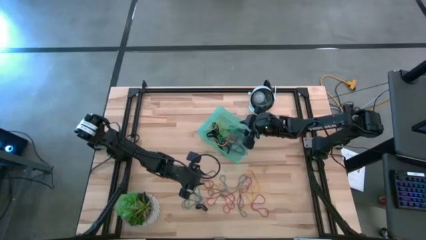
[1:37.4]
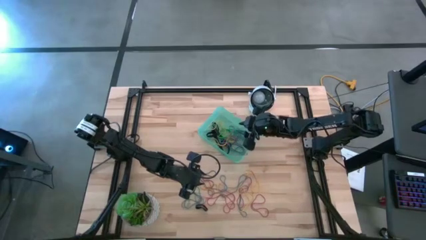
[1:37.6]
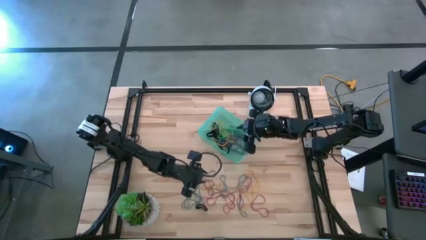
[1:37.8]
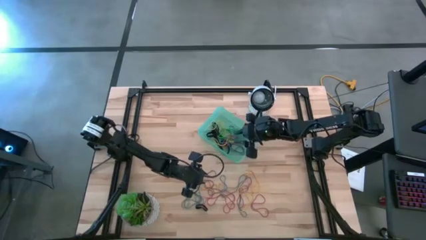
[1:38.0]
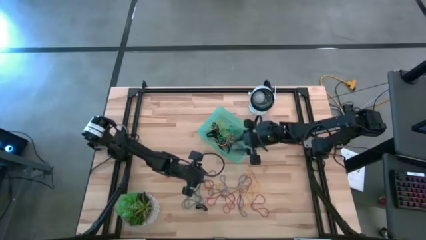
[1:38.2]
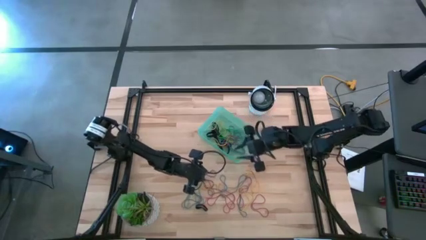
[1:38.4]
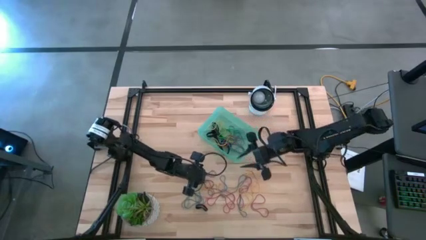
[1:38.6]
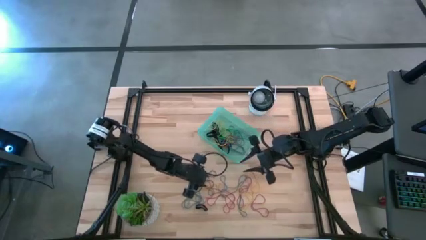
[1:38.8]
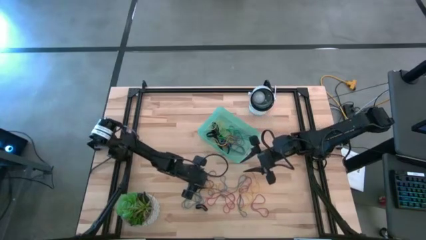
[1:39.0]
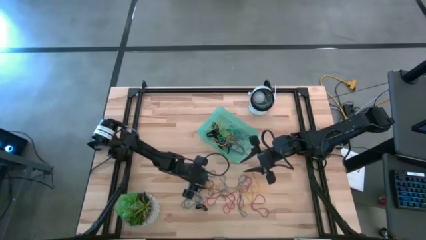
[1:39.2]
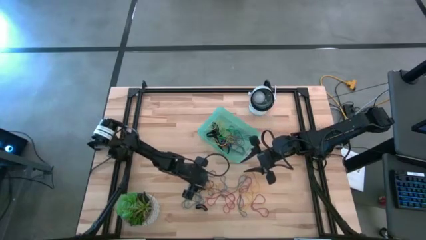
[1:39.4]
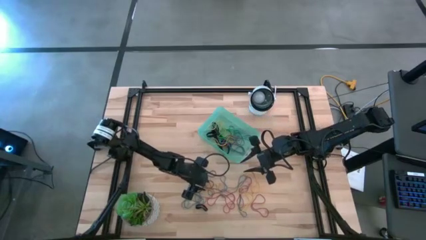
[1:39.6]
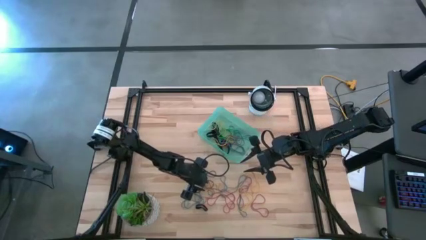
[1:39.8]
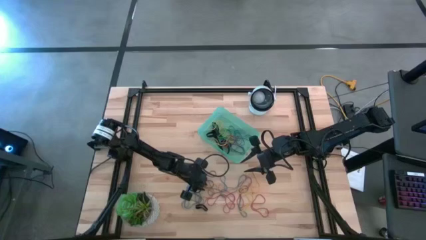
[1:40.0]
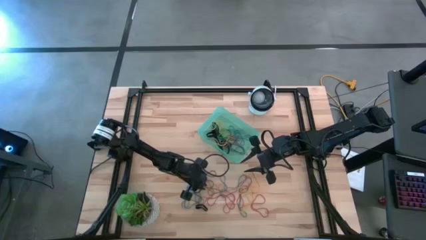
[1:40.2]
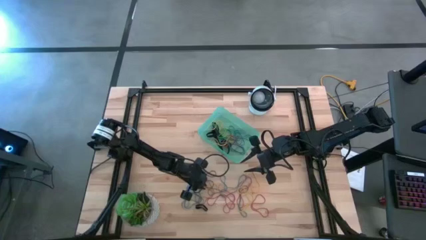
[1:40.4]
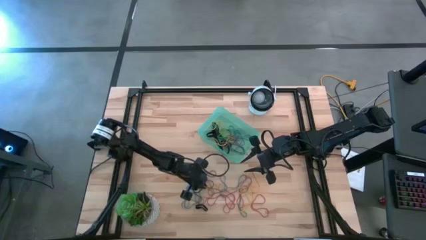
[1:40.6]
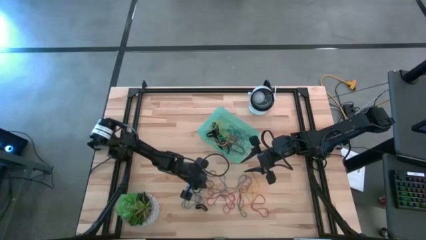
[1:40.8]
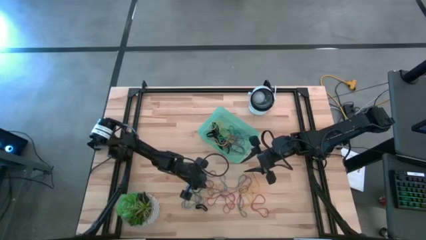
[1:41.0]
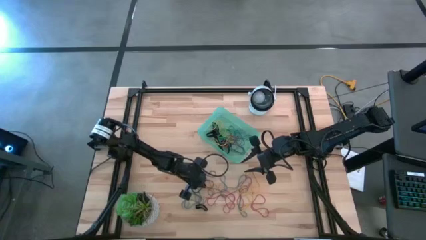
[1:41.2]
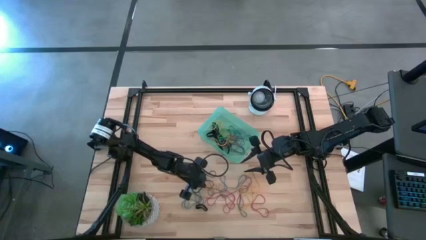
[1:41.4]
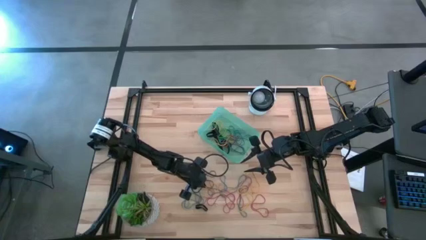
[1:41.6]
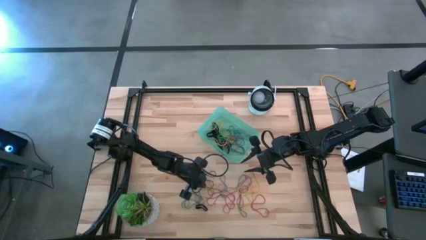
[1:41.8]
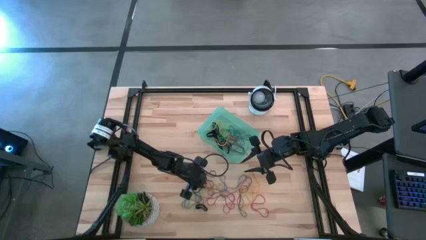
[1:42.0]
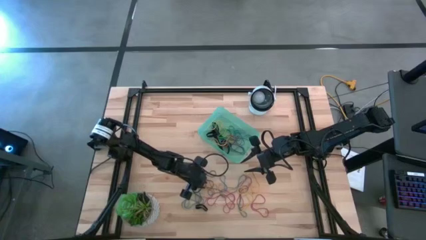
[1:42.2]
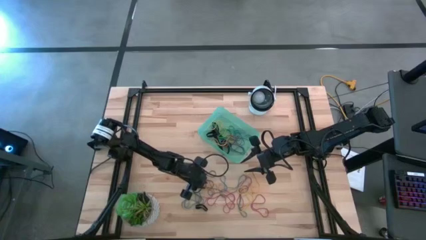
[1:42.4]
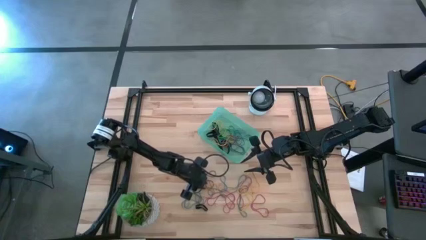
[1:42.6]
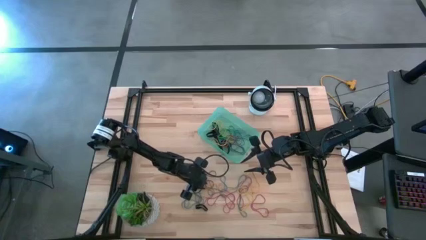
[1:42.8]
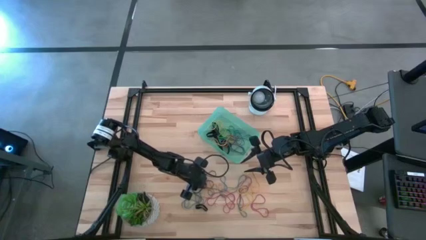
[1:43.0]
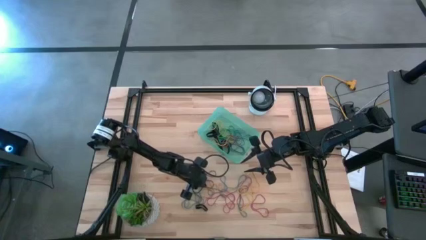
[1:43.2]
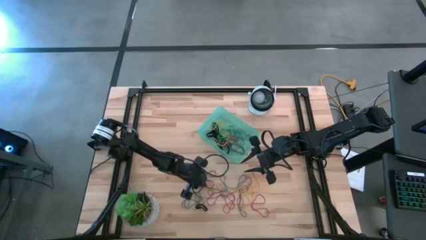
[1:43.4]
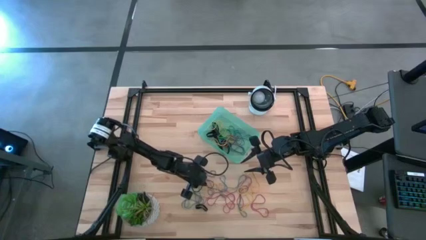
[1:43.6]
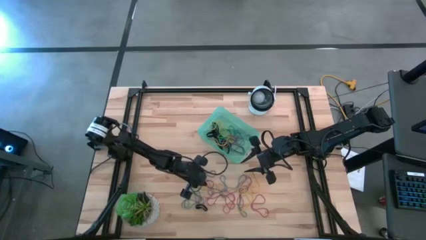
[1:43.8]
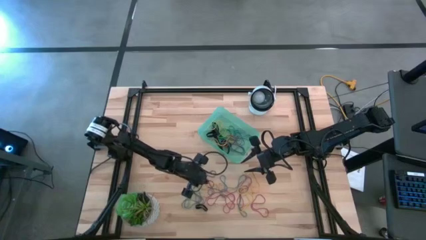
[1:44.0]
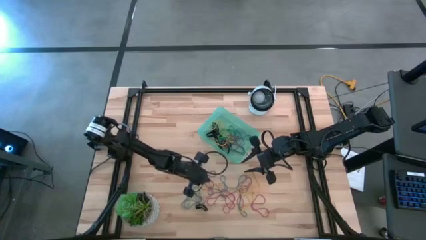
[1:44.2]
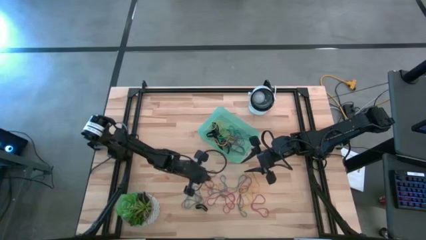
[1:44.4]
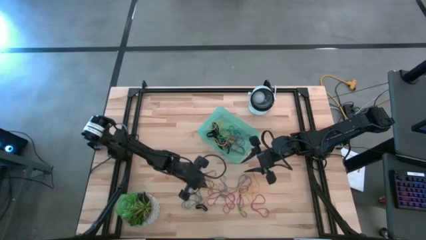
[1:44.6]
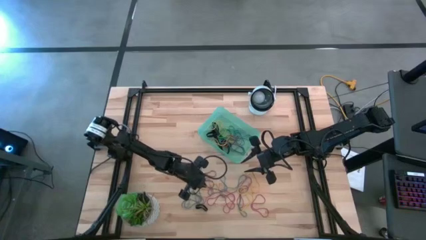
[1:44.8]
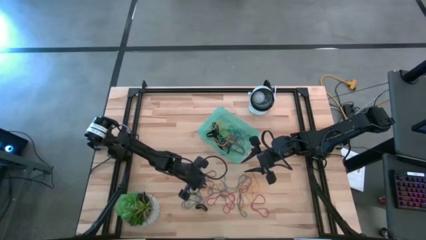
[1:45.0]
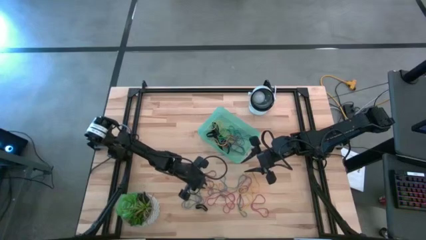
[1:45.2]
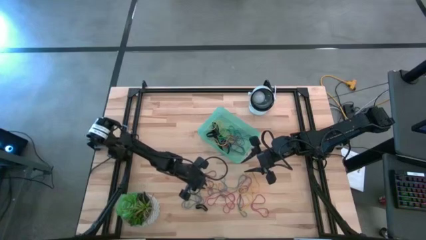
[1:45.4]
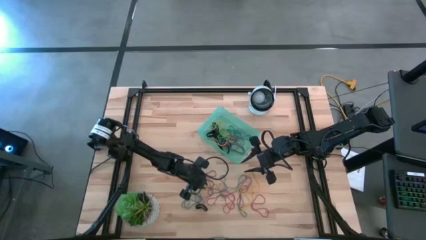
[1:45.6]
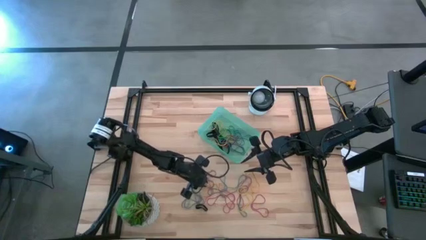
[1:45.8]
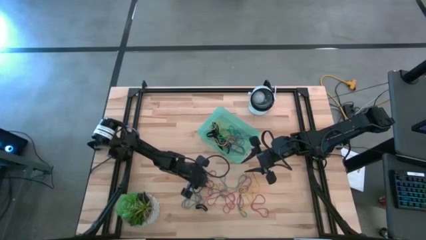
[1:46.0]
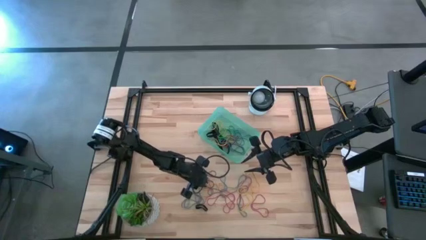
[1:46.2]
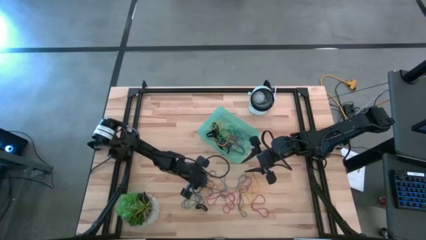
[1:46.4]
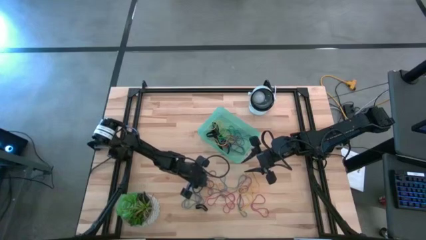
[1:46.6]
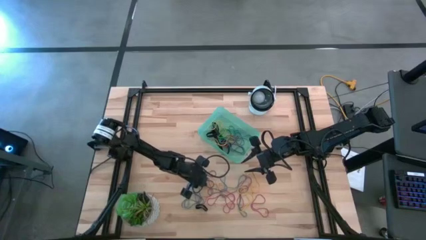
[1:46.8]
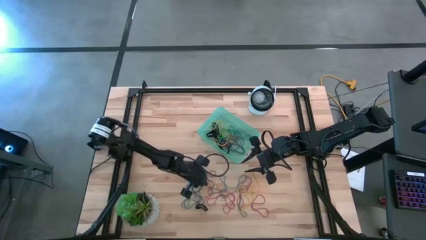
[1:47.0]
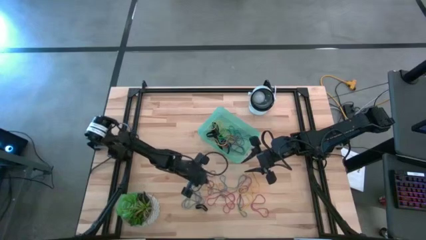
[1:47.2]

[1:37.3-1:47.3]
Task: Pick and place rubber bands into bin
Put the red rubber band into the blue bin

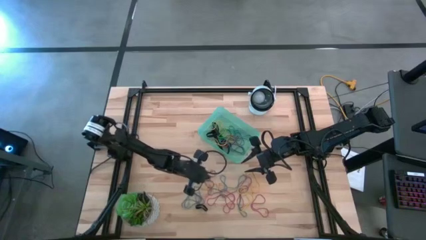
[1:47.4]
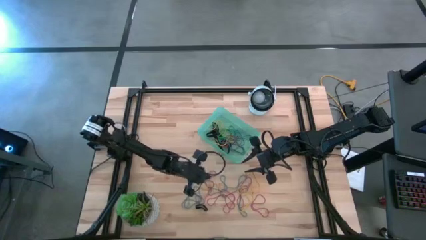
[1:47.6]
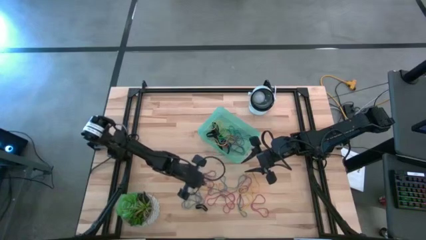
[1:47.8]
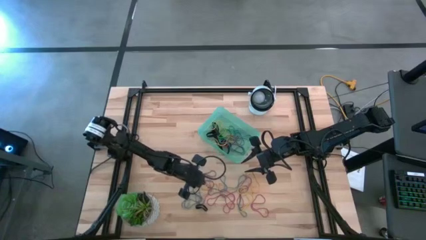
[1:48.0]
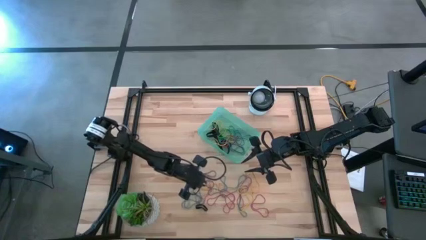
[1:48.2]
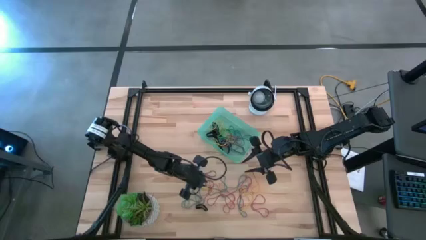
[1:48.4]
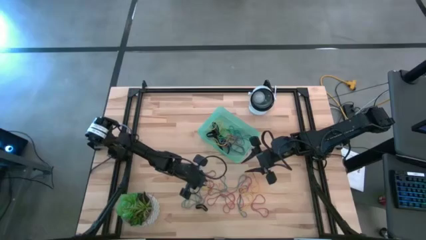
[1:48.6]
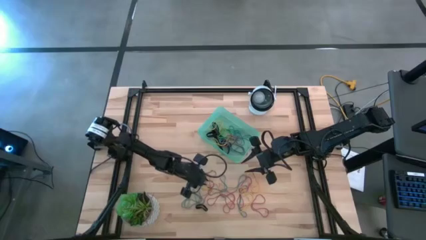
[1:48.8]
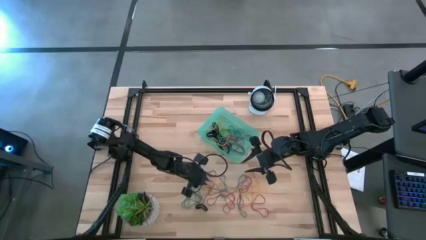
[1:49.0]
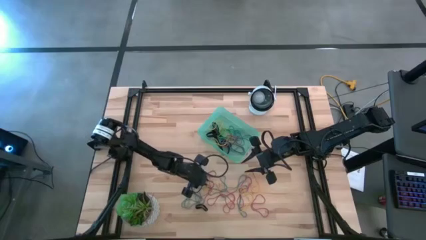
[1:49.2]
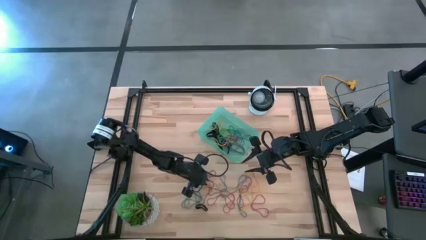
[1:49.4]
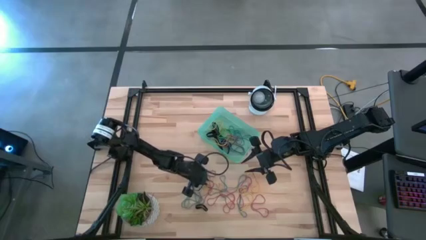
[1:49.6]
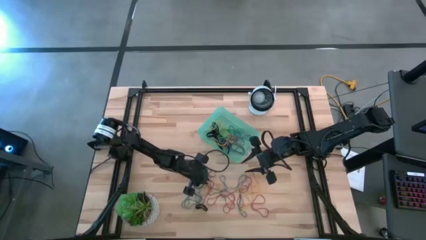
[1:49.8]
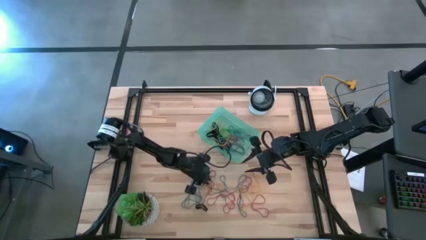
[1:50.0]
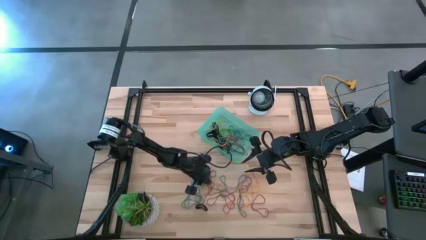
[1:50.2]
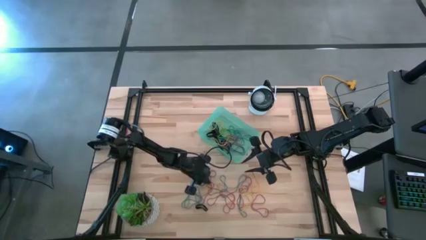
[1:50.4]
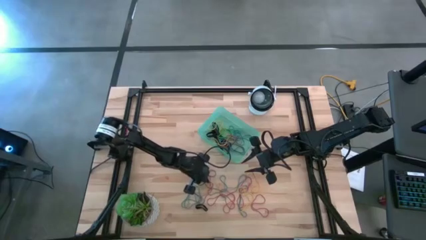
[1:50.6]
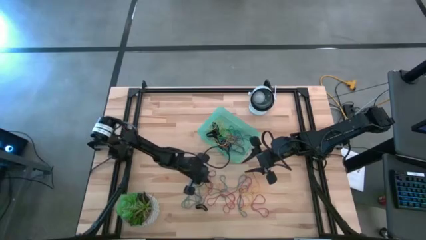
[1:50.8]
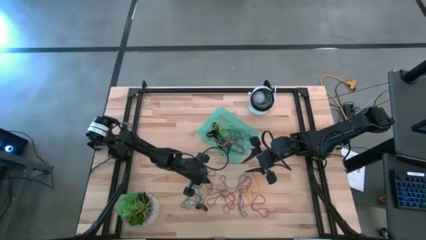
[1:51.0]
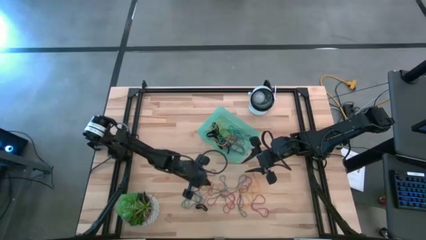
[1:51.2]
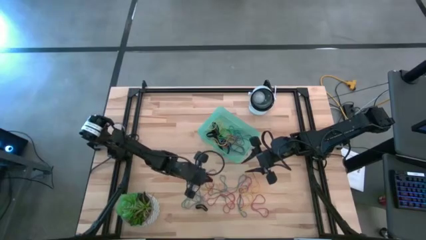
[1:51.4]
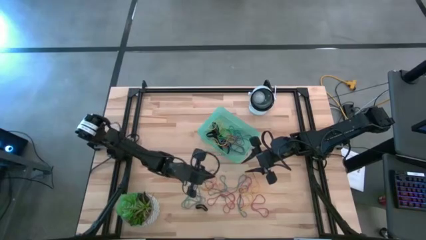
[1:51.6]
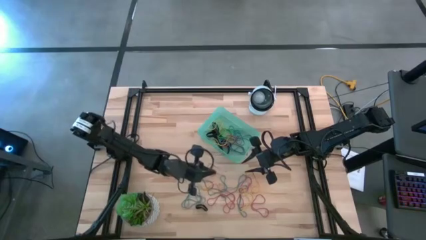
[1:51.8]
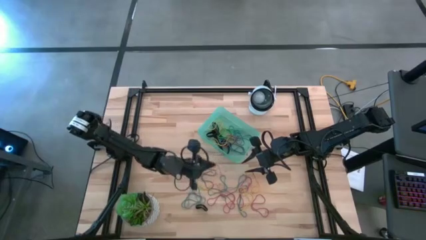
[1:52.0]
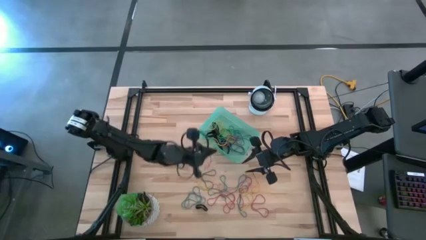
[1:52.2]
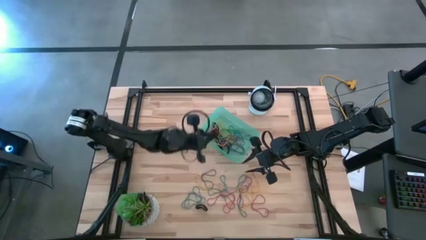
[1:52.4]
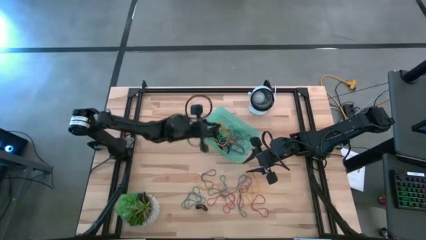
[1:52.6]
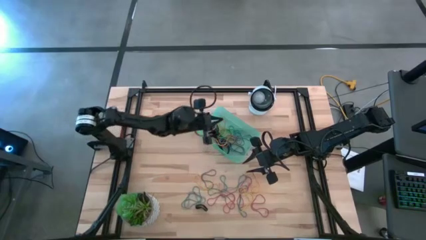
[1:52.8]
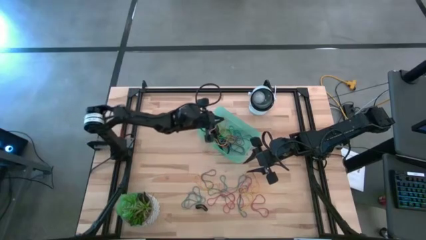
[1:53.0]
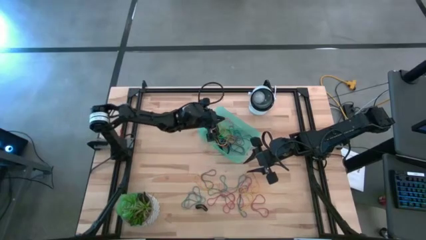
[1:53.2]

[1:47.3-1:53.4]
Put the red rubber band into the blue bin

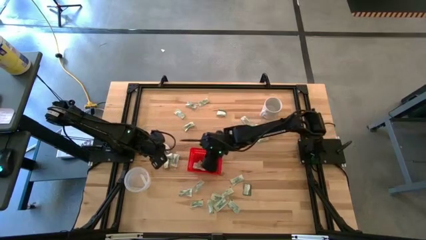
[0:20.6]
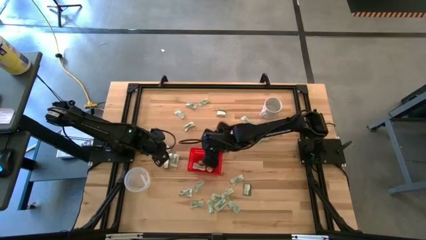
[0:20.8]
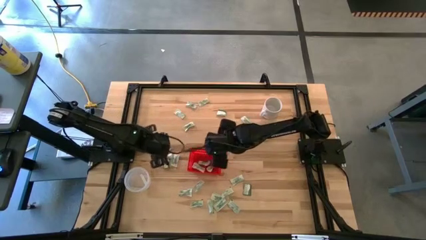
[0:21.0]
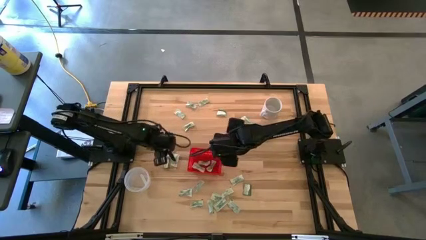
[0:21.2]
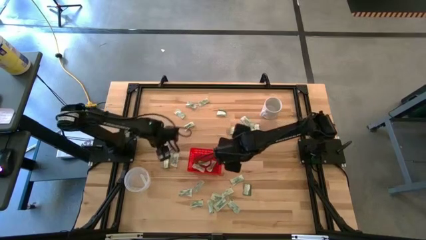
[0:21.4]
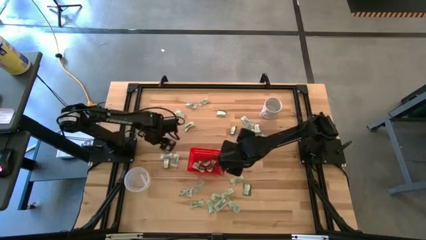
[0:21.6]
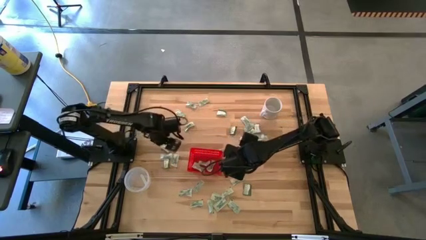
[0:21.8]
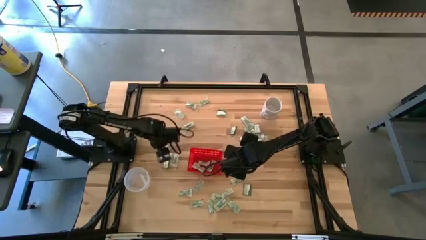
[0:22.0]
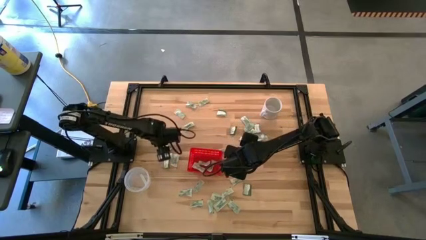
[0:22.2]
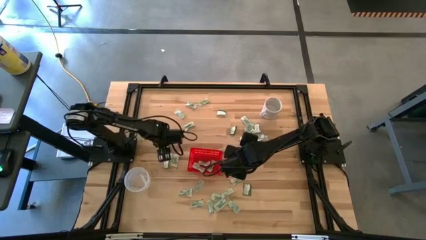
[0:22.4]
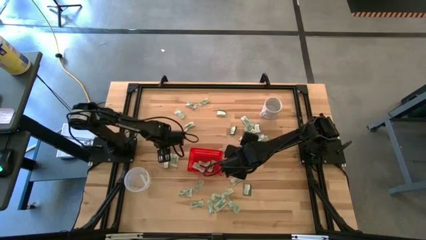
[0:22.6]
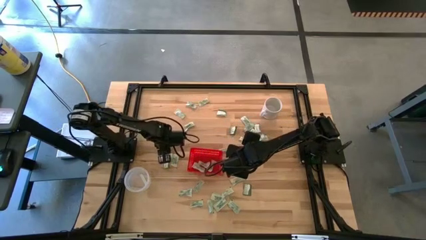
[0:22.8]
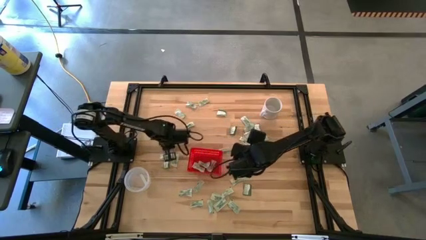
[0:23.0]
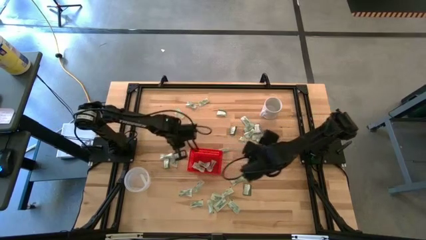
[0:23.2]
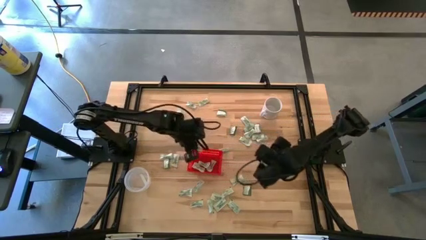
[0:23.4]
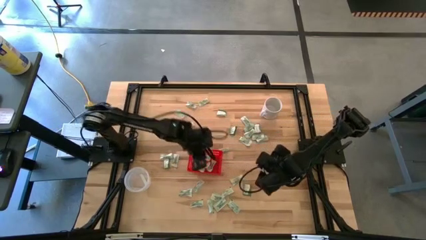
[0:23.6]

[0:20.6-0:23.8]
Task: Pick and place Stevia / Truvia into bins
Put the dark green truvia packet into the red basket
